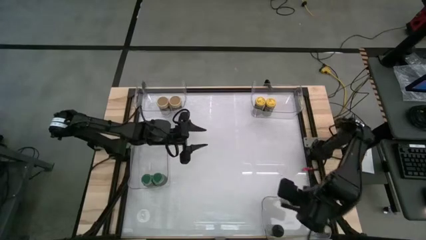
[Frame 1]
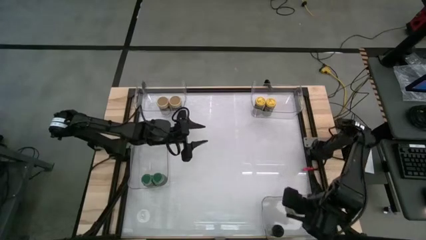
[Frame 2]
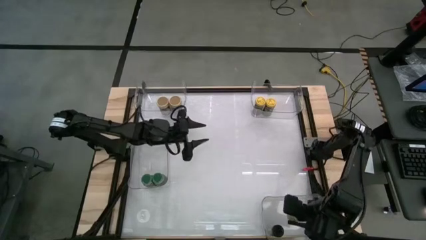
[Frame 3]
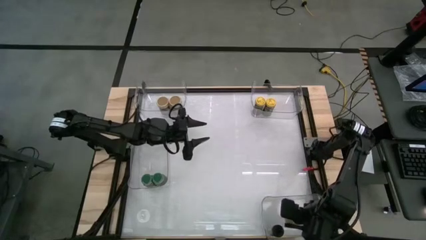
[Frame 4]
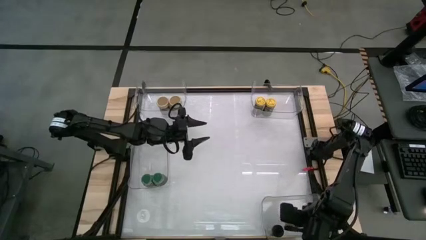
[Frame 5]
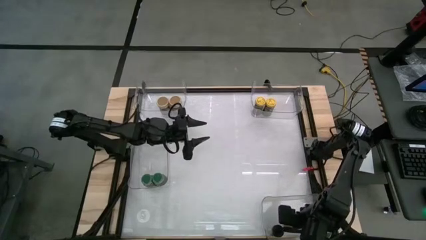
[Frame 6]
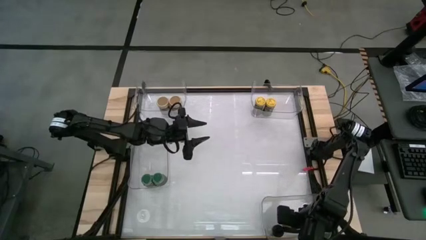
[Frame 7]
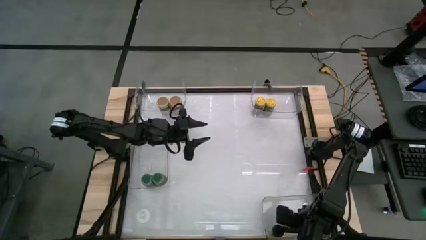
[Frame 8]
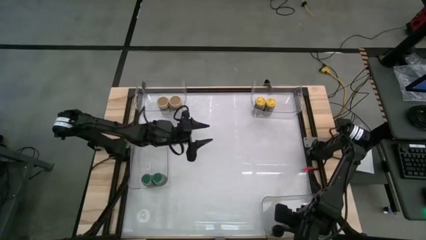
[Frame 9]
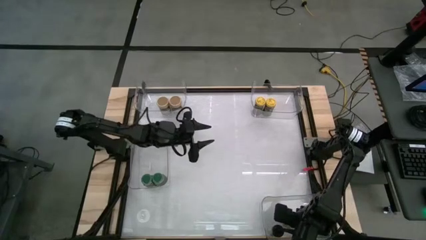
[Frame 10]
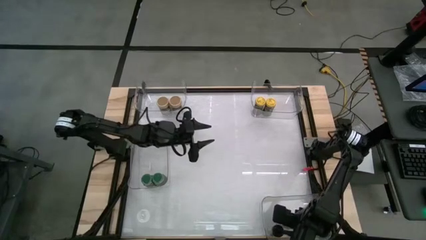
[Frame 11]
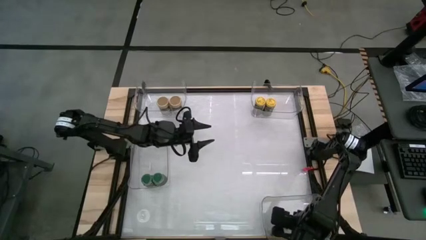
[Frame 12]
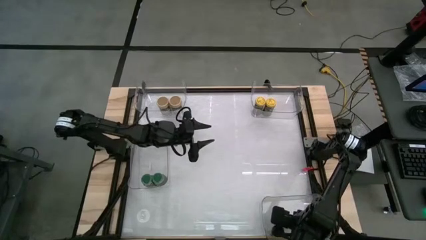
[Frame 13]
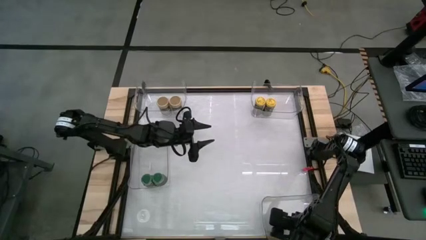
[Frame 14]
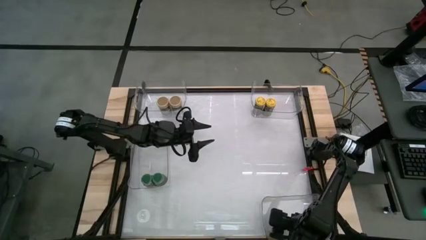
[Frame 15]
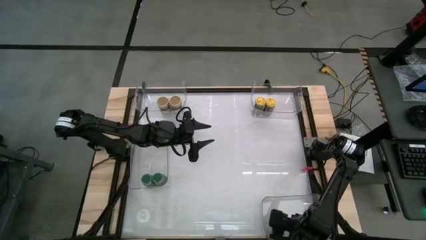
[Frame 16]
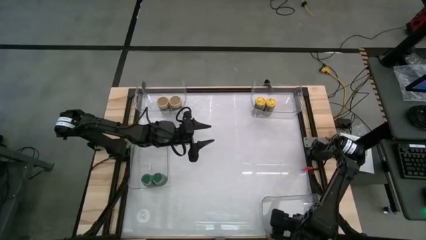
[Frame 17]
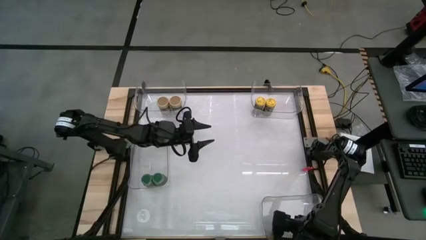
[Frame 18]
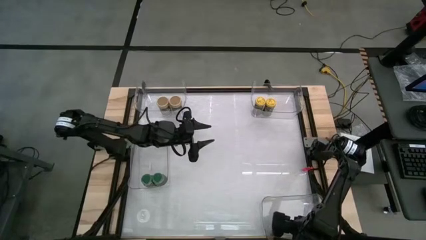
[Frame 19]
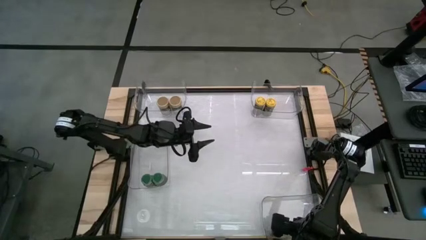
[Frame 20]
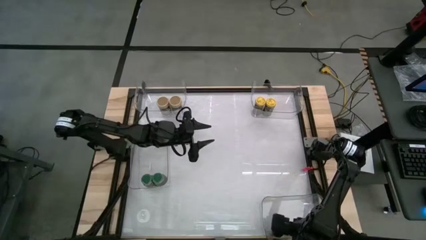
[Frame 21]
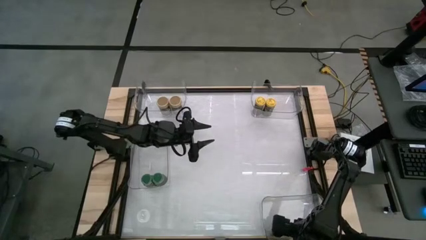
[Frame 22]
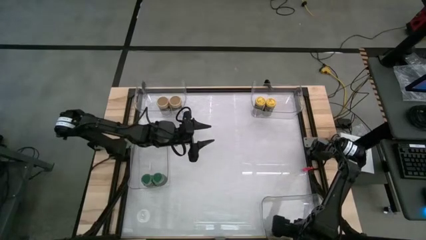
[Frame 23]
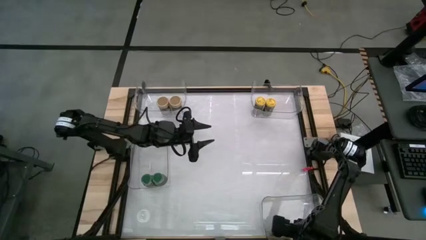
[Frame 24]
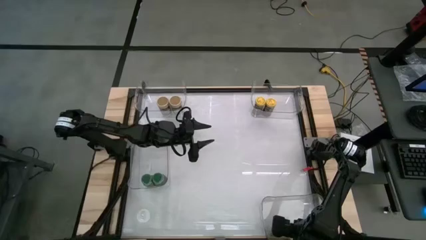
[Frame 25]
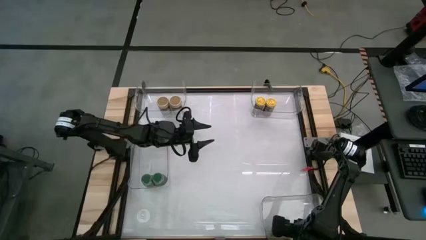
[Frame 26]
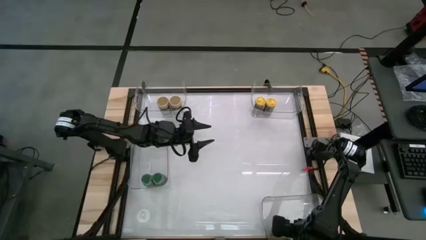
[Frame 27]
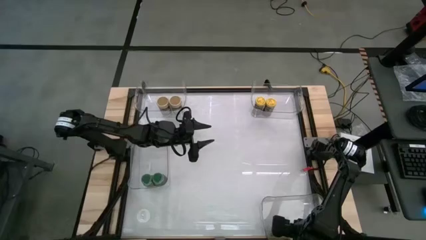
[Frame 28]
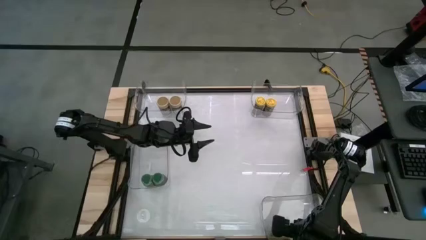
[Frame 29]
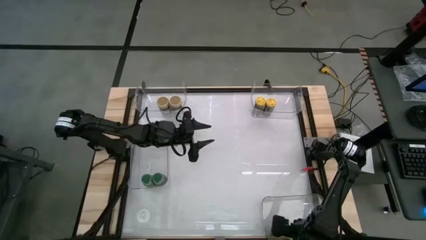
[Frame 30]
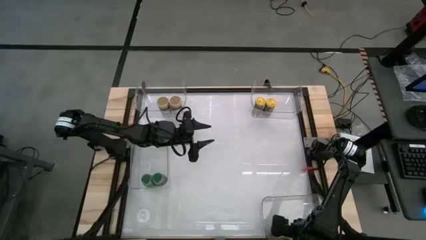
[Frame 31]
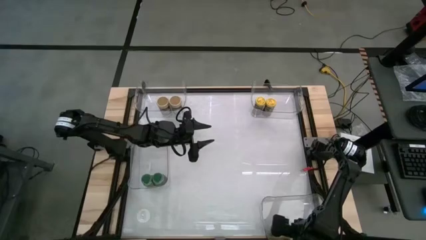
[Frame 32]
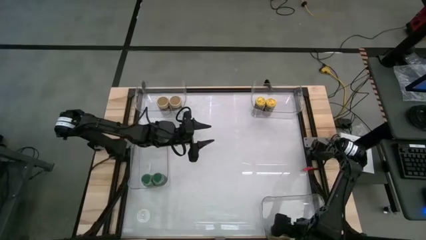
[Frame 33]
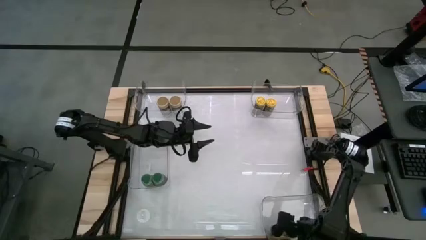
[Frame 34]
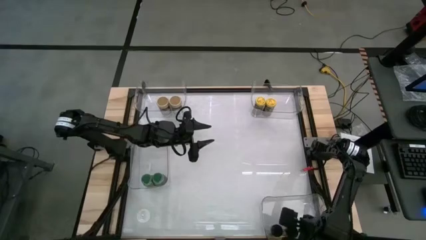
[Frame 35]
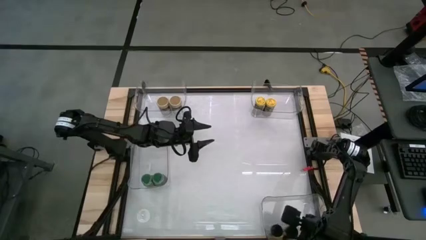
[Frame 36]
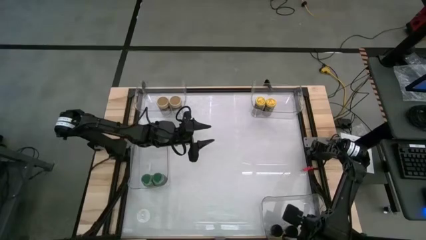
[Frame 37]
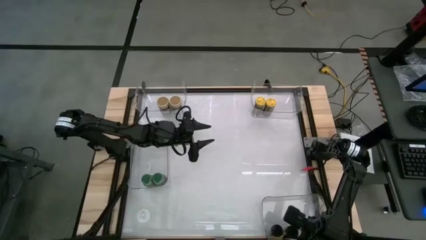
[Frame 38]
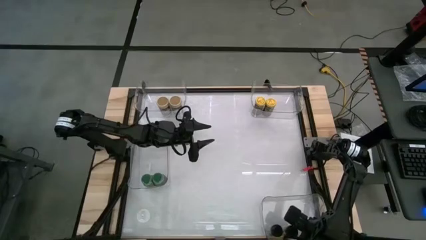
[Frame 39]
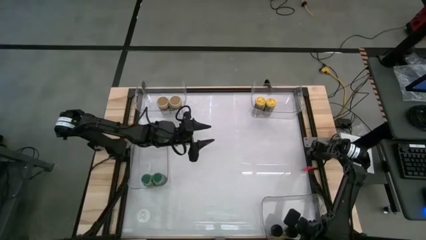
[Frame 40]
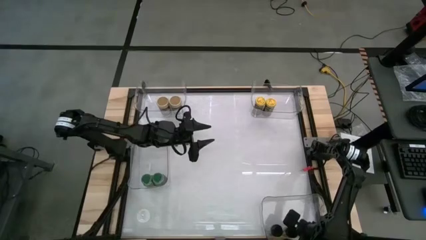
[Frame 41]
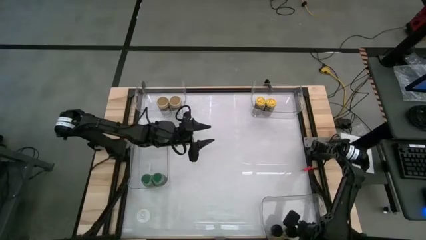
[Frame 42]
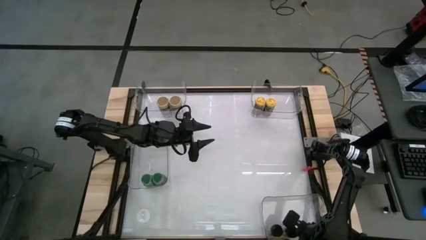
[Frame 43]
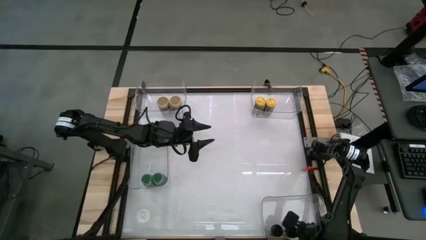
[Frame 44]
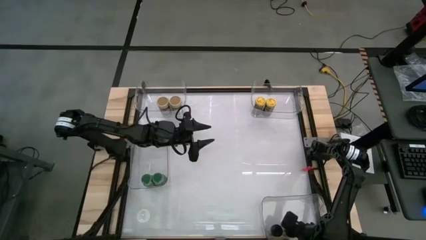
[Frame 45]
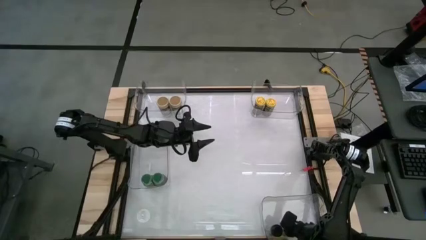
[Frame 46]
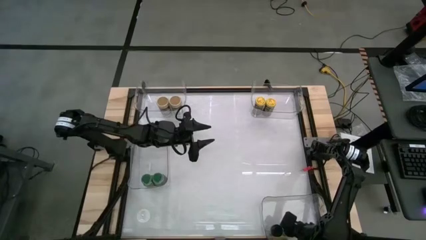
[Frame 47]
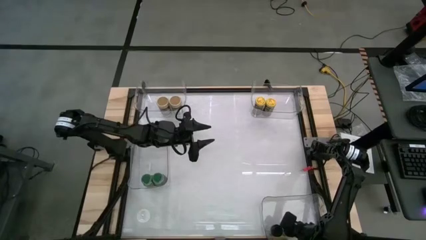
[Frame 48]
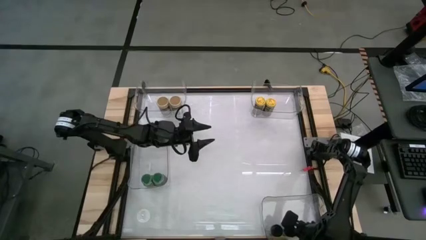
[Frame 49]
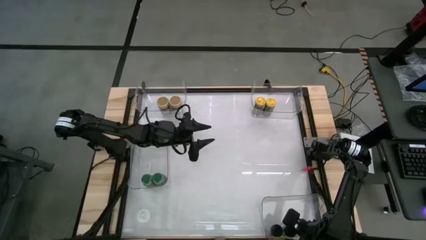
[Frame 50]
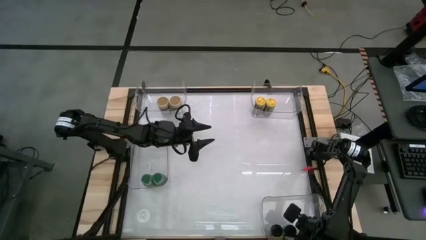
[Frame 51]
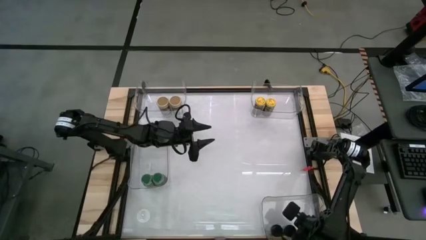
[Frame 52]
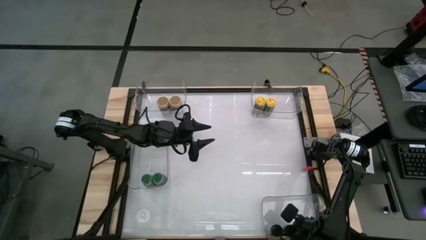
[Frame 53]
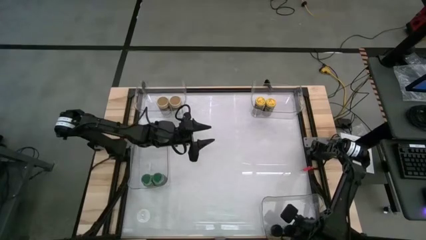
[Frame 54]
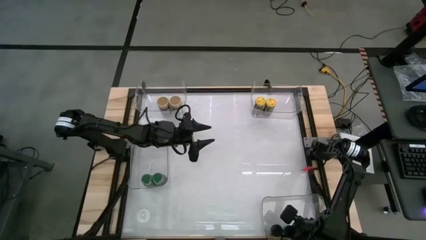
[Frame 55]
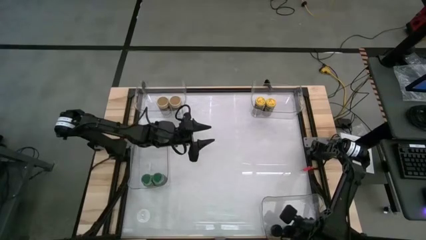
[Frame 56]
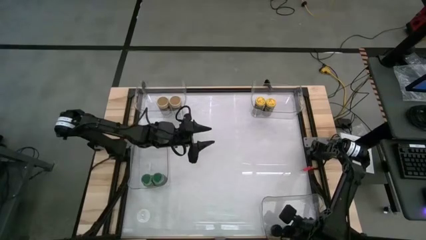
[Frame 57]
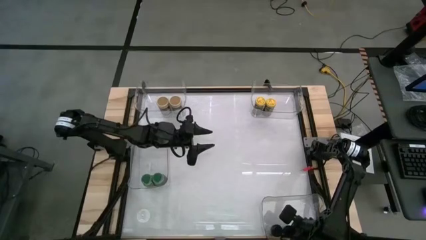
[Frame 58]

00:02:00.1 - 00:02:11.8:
Task: Sort spices by type
Put the black seasoning bottle into the bottom right transparent bin

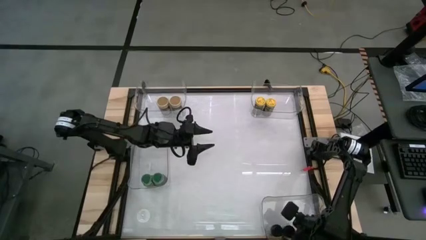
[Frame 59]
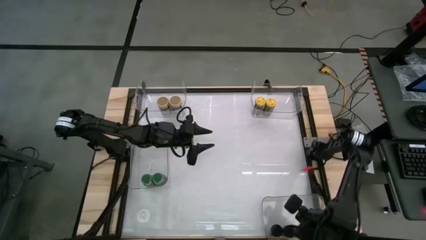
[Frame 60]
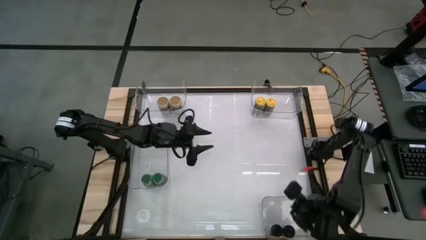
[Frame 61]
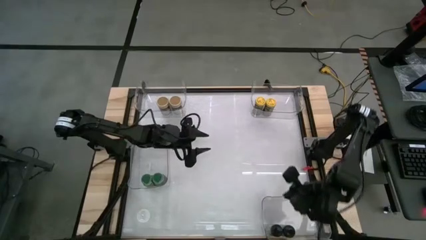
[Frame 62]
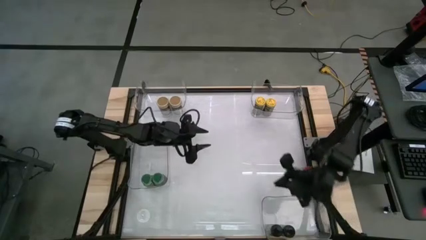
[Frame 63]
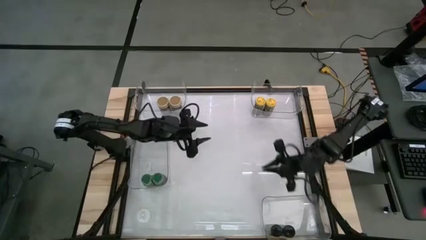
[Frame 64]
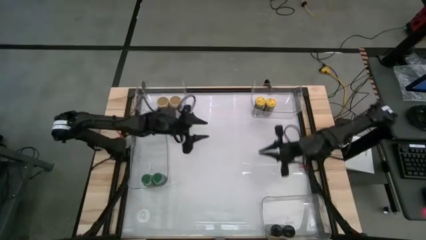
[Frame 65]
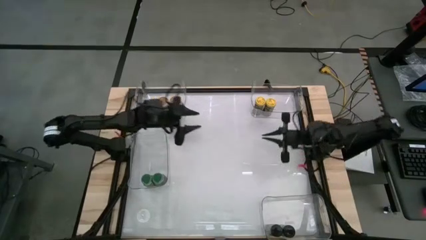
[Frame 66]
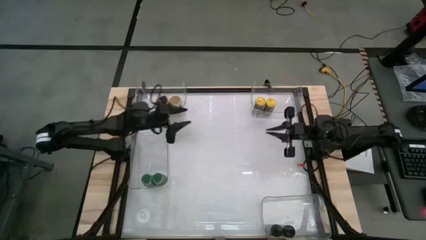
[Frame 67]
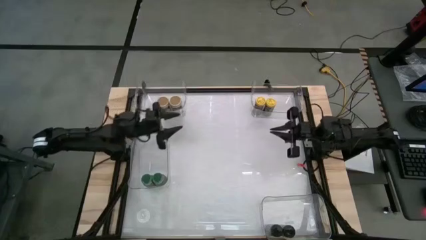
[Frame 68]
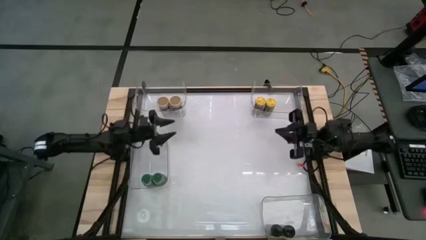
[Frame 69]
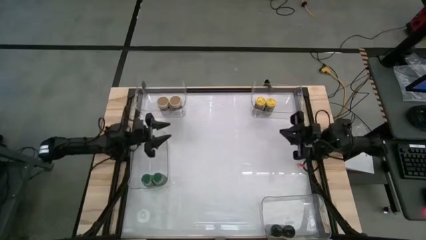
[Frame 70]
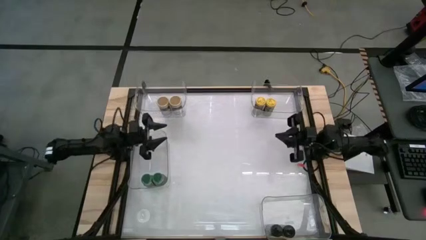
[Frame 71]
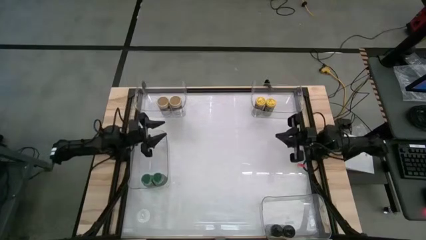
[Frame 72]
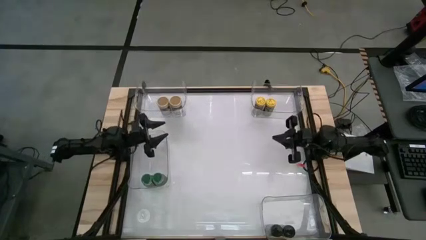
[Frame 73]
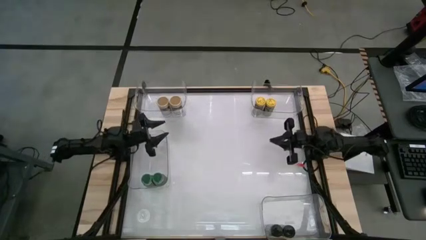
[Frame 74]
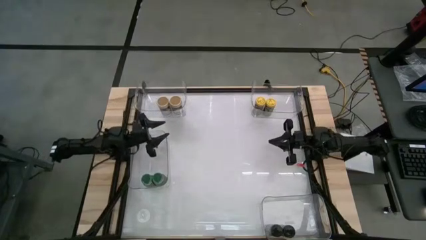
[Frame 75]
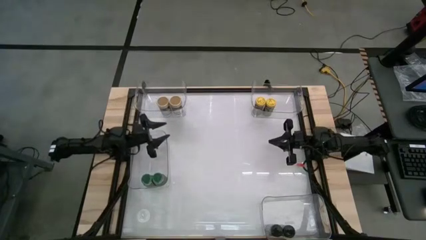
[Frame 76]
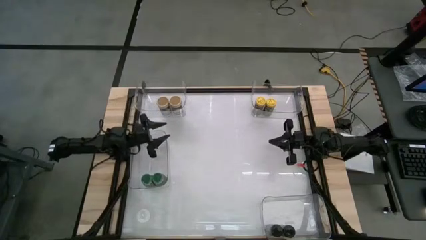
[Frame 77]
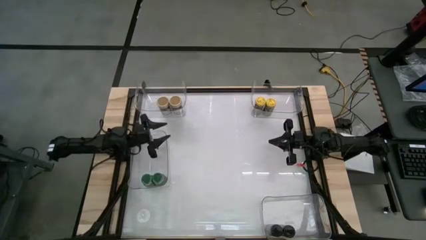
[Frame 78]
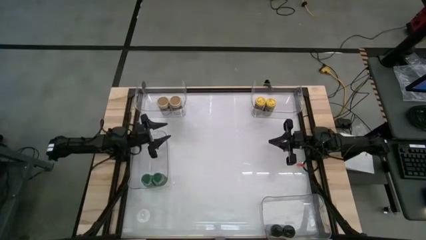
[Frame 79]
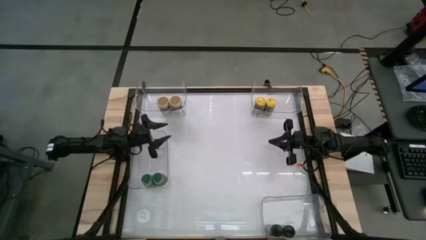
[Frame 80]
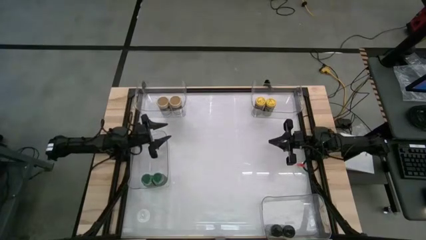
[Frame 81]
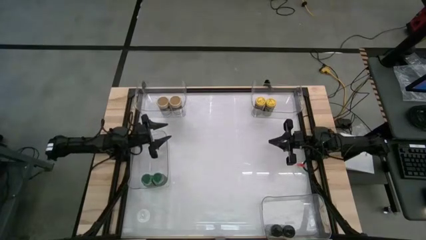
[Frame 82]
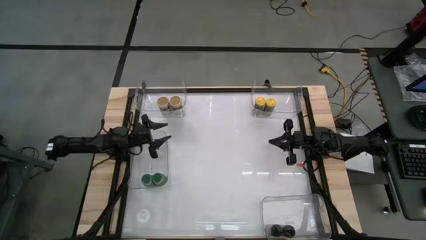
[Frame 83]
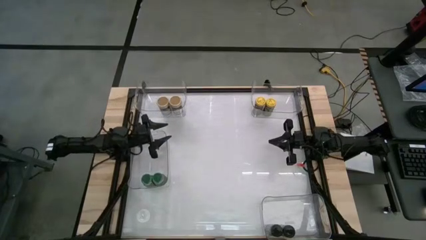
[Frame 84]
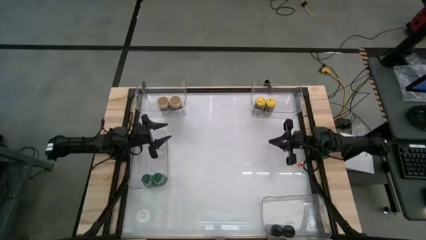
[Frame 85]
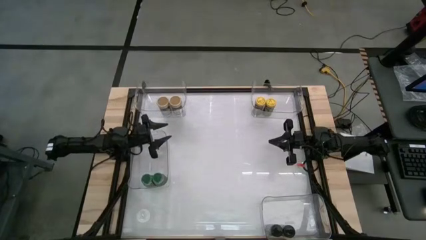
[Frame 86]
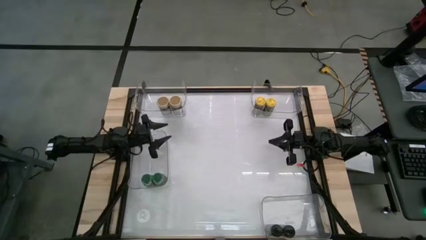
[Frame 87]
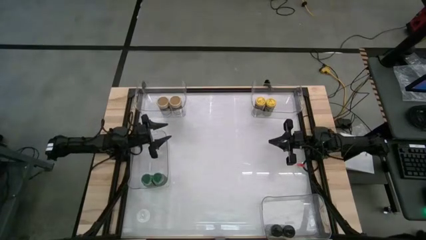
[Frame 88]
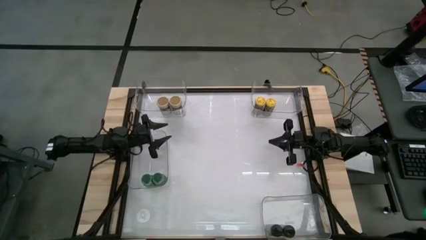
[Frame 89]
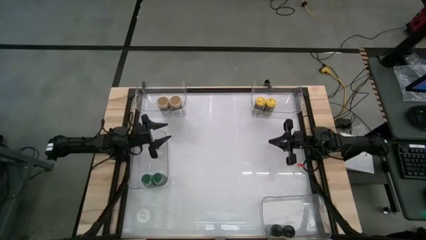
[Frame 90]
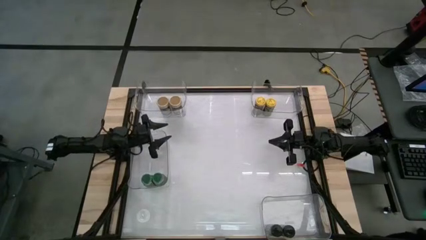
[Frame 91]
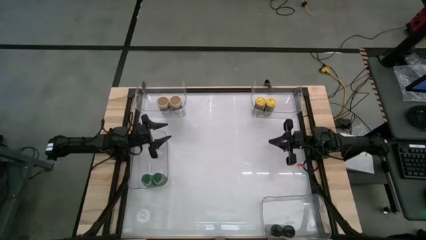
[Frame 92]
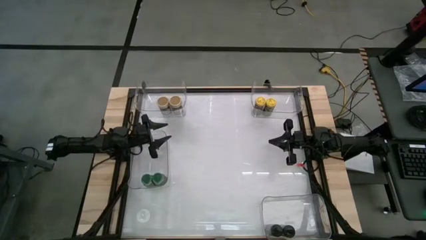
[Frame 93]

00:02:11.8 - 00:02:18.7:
Return to Home Position
